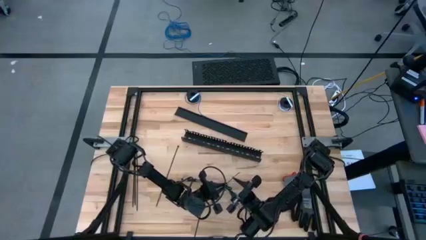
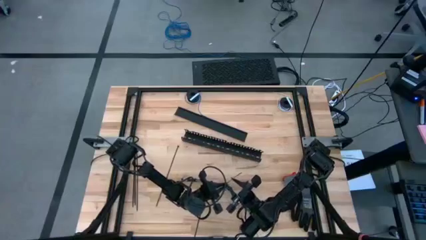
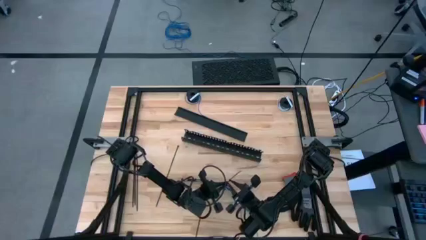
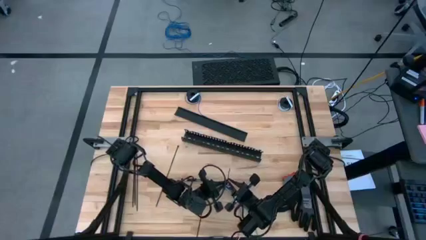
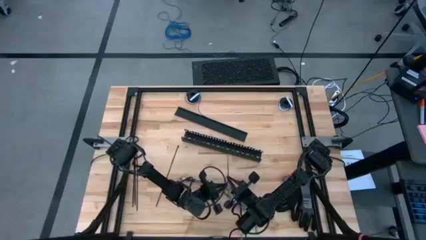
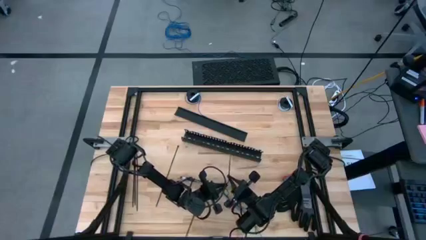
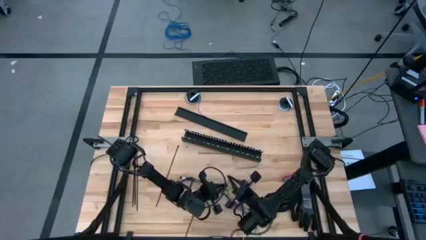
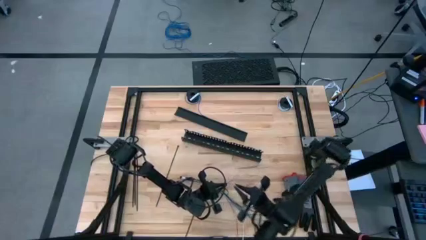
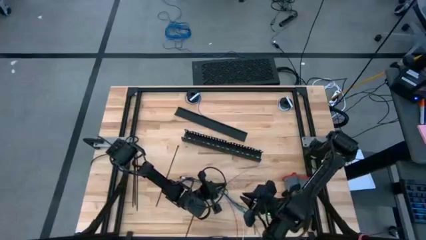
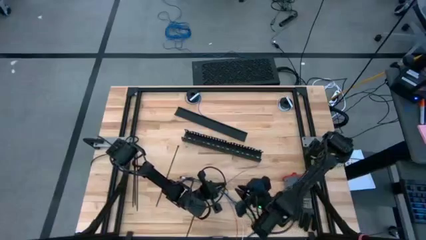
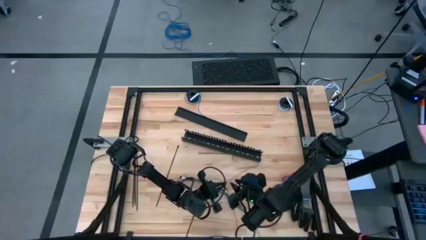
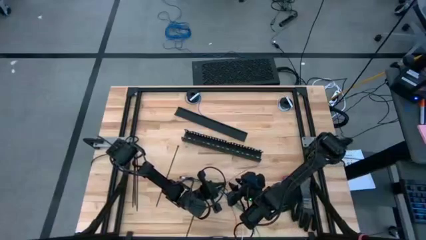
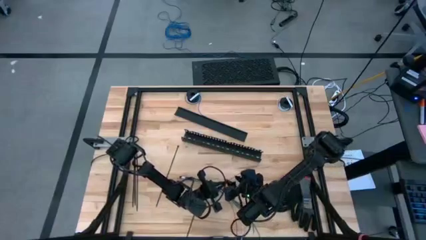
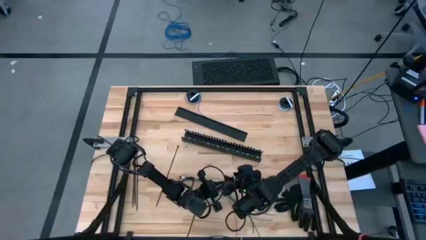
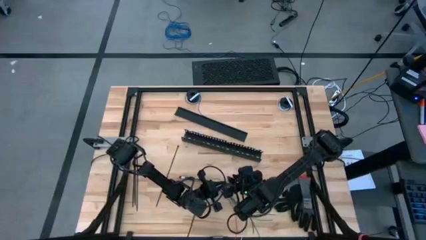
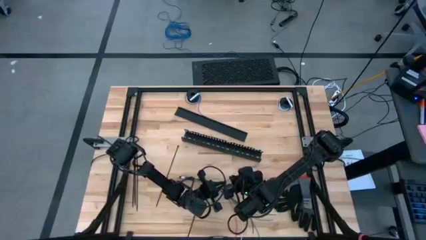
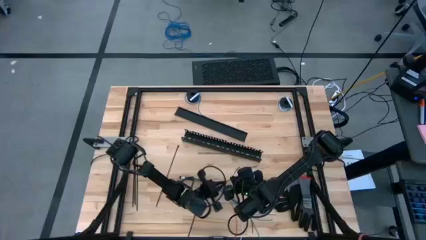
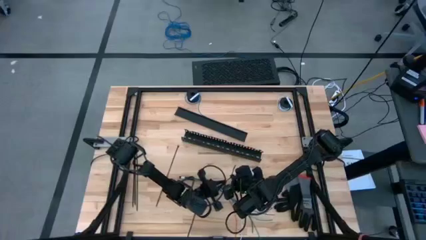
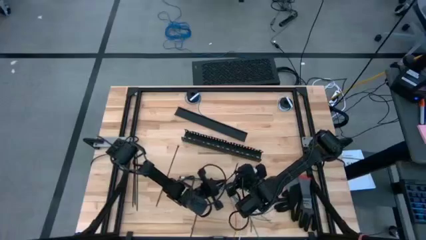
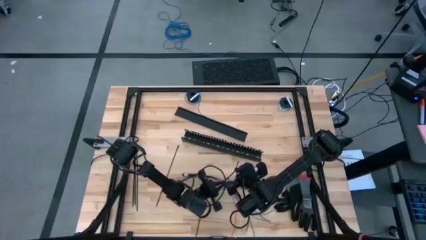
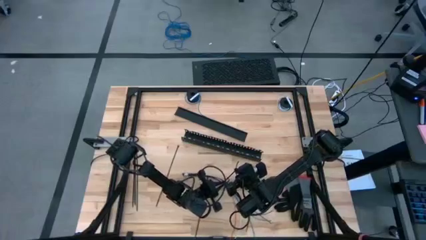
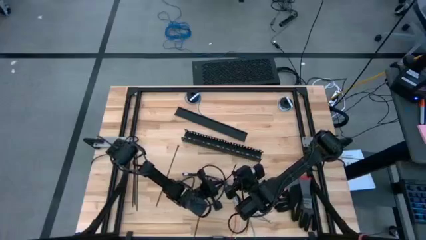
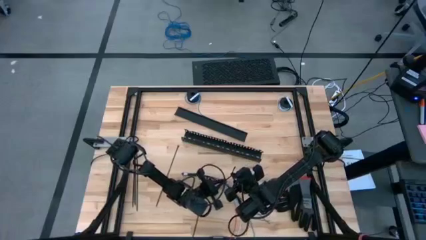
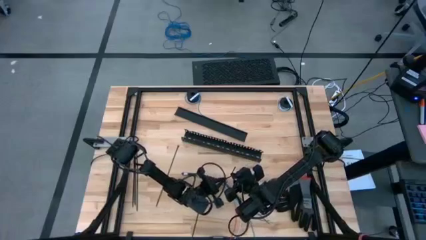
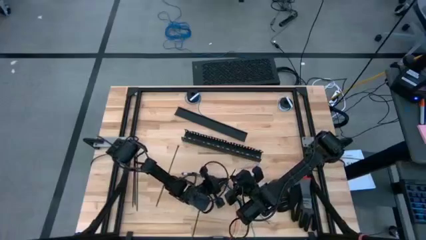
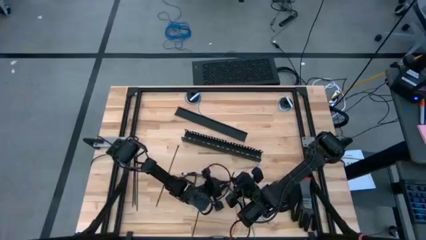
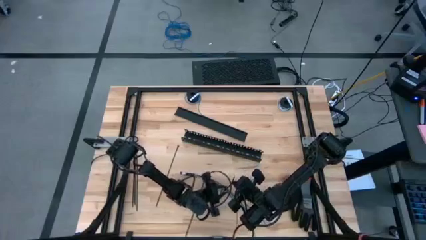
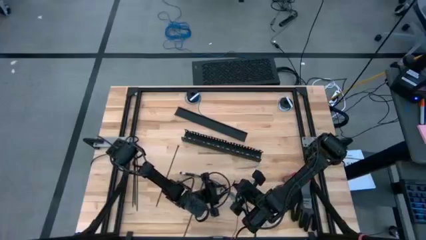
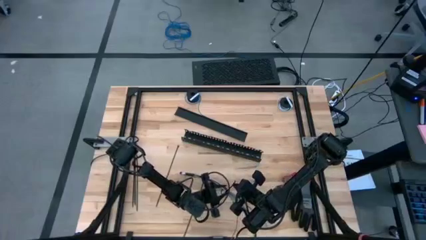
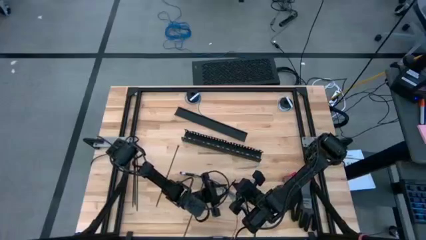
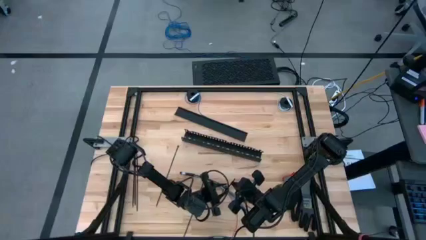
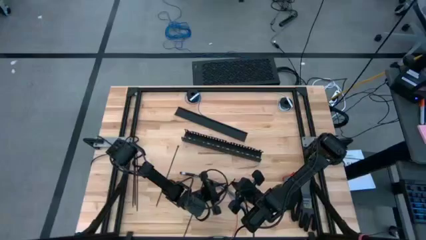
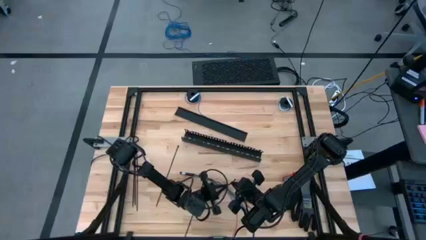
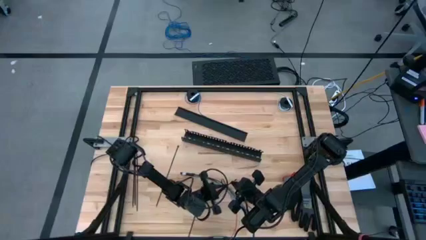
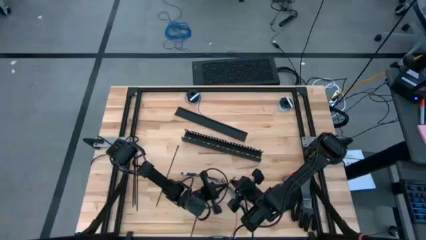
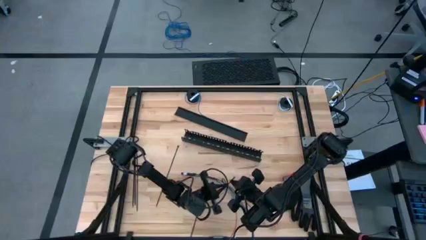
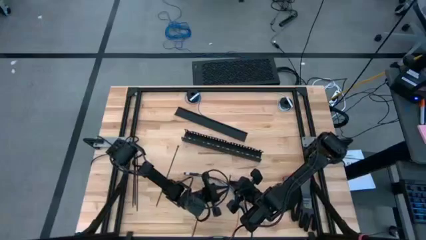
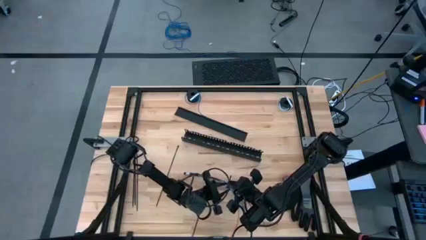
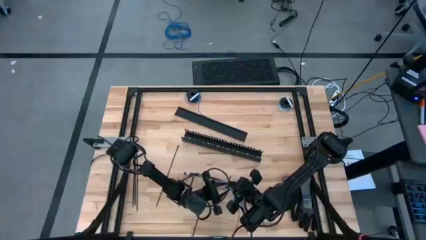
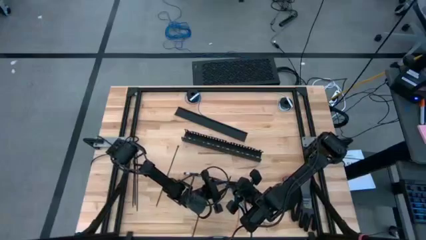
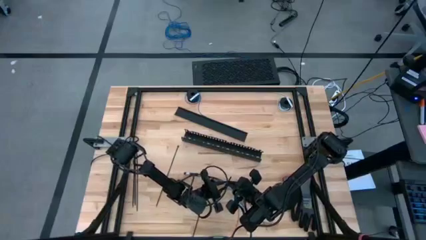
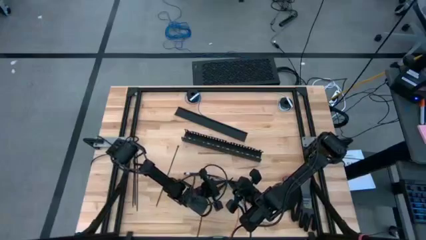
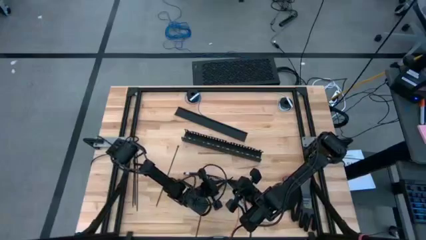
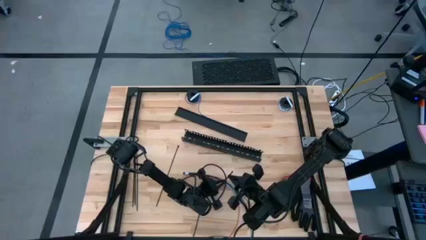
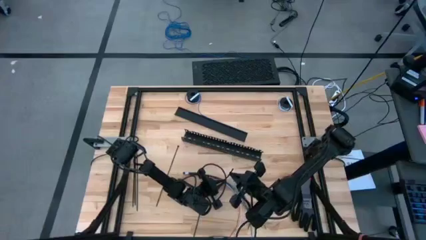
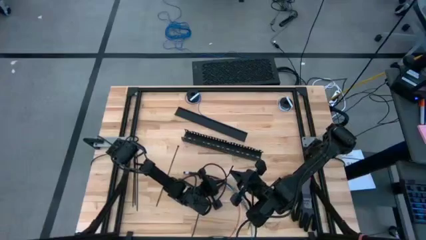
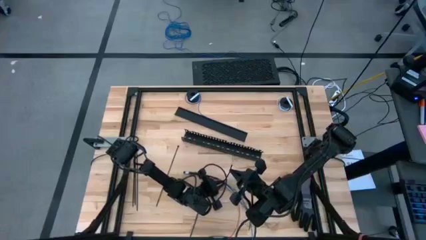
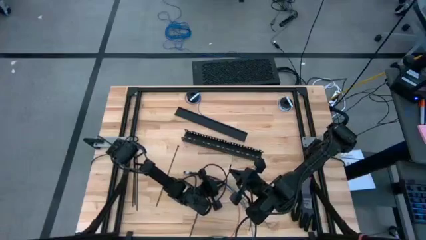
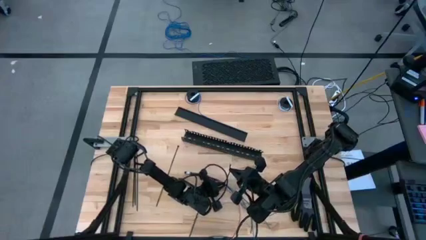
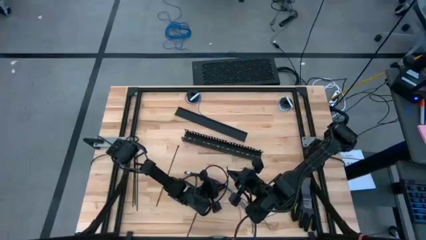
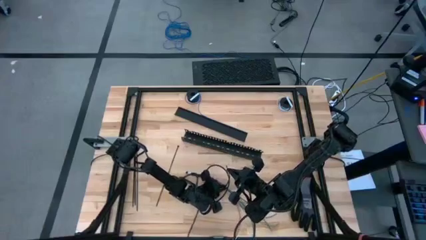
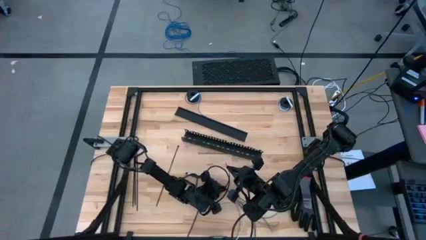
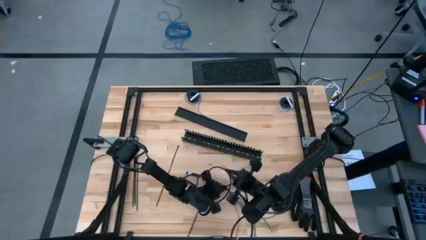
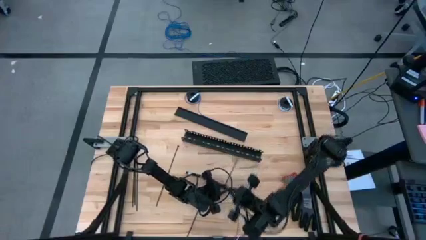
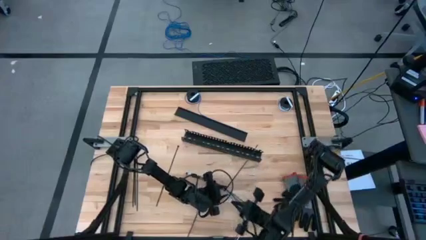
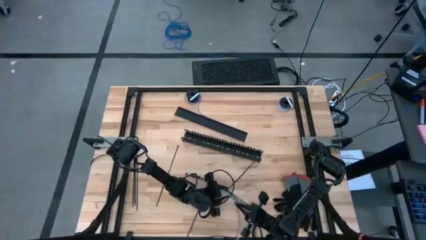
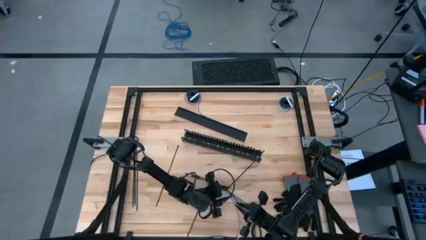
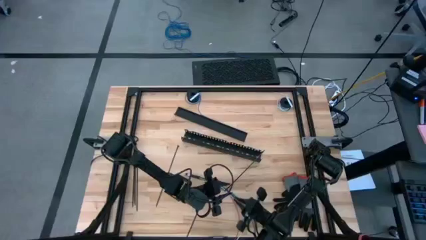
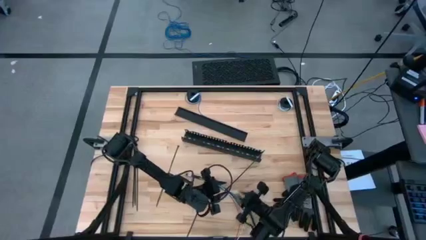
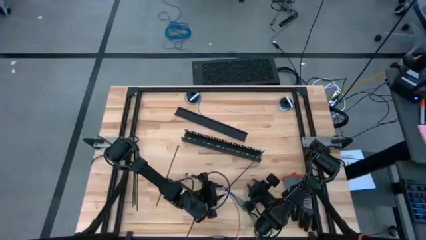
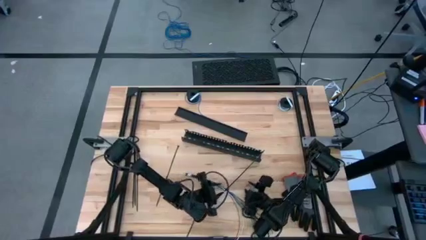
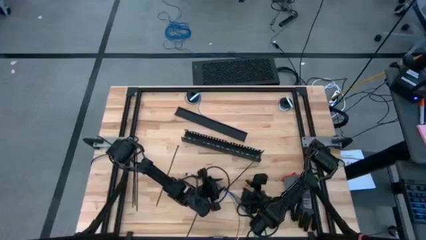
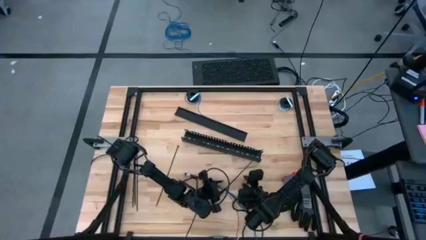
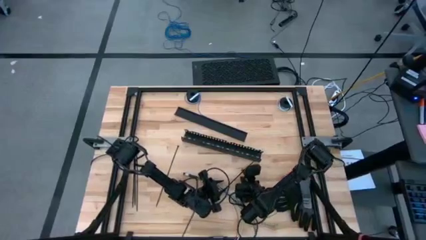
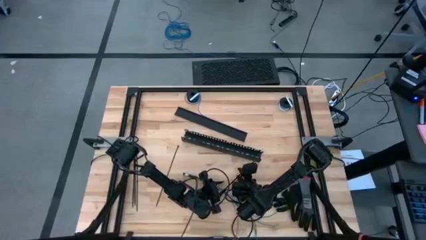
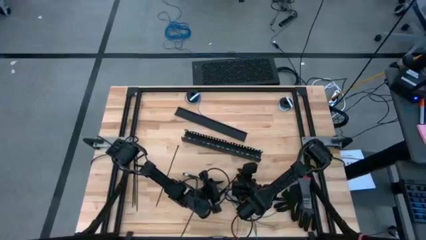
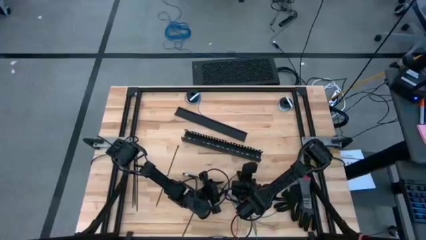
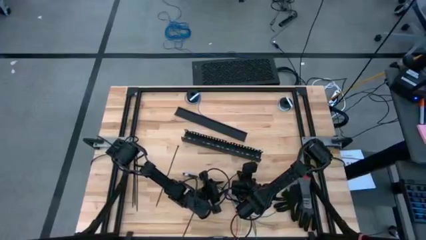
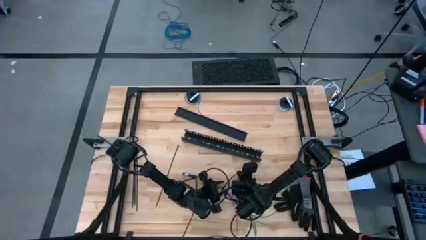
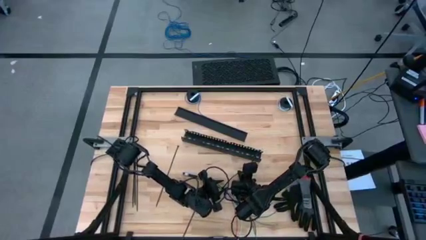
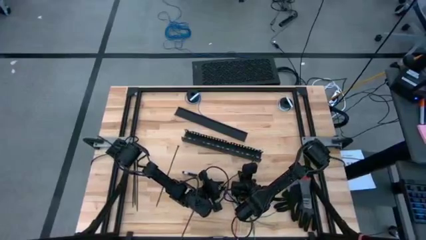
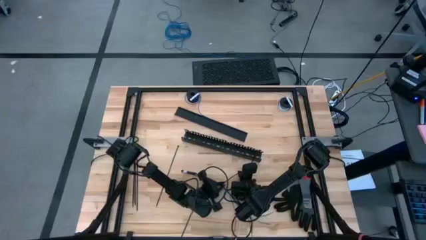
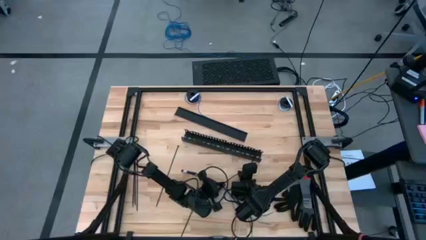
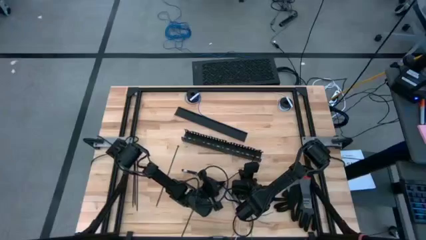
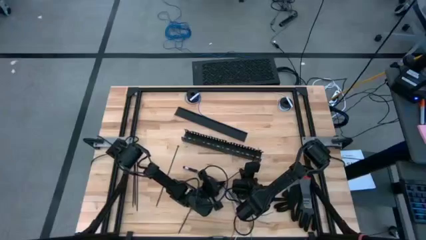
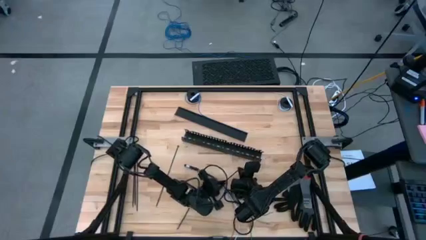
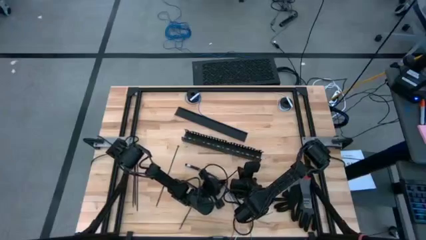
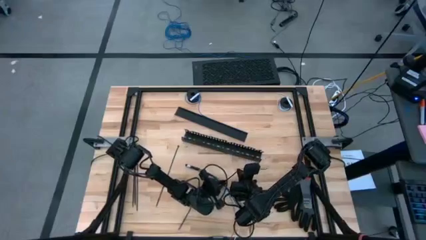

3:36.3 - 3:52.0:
Task: Ziptie cables
Wrap the cable wires with the black zip tie
